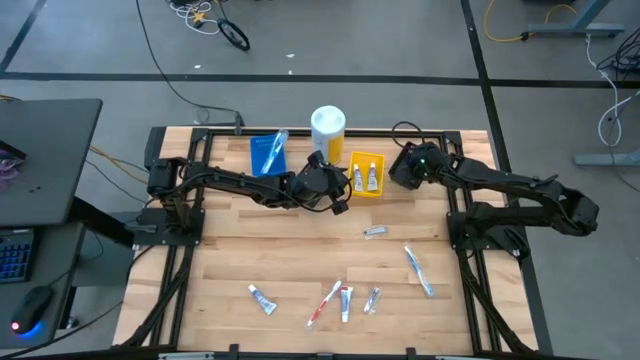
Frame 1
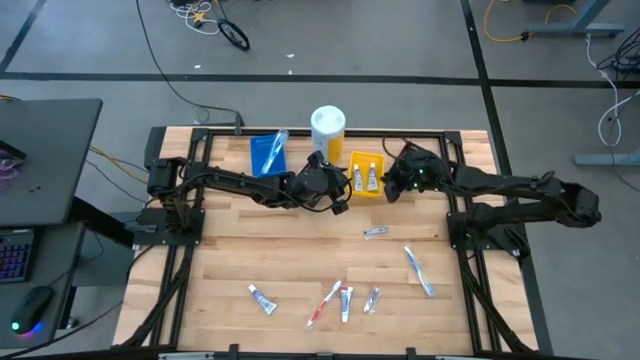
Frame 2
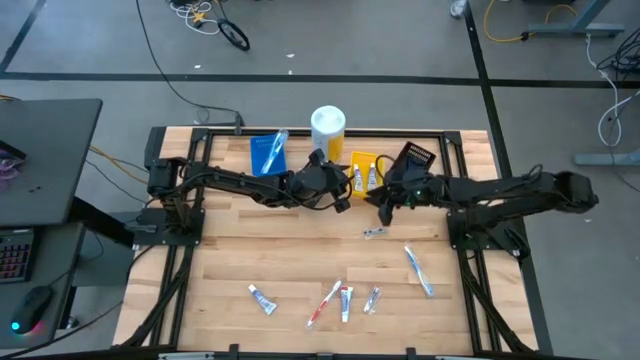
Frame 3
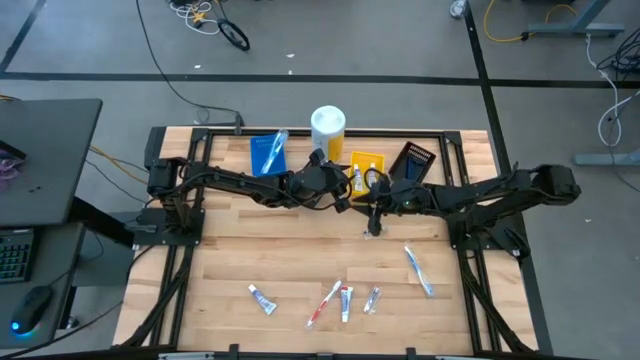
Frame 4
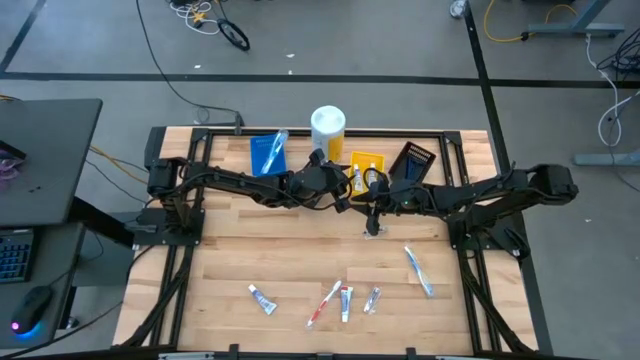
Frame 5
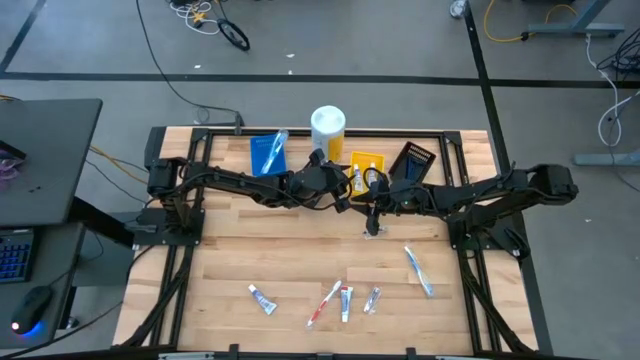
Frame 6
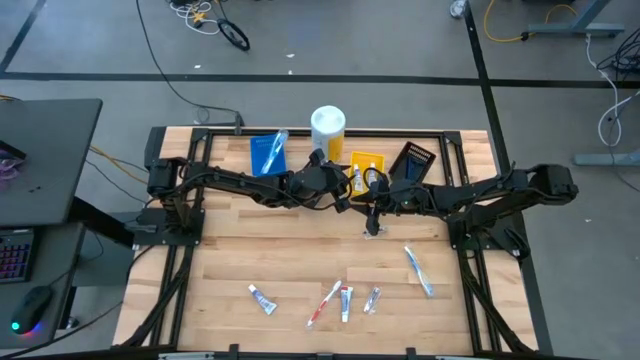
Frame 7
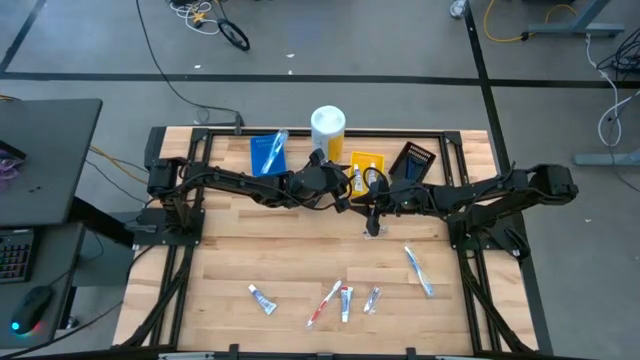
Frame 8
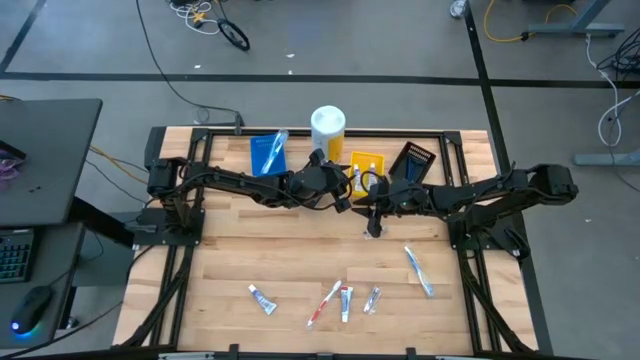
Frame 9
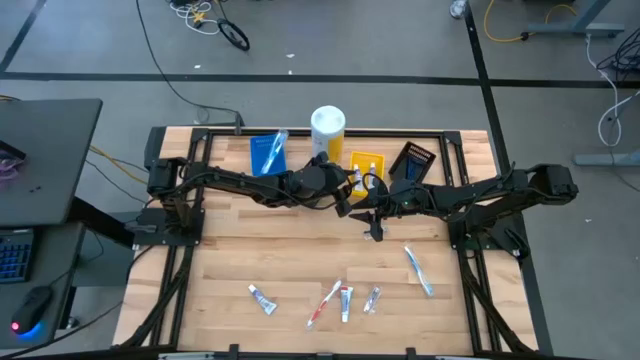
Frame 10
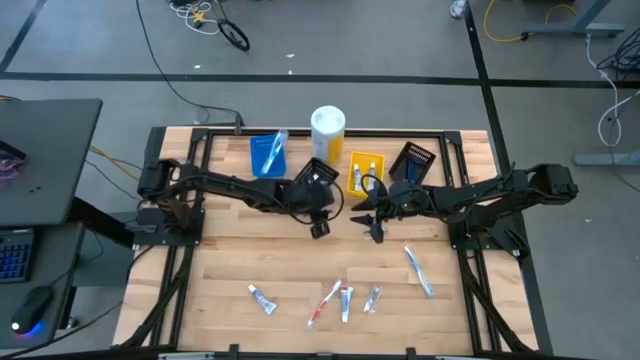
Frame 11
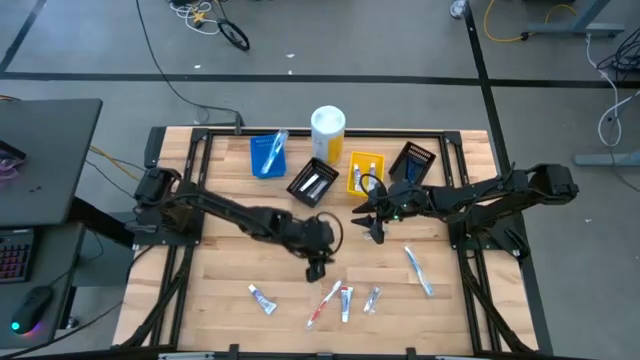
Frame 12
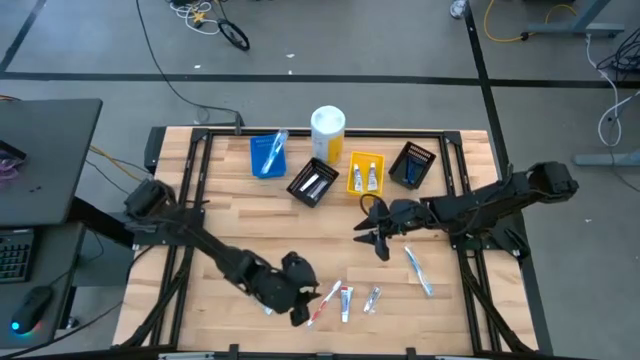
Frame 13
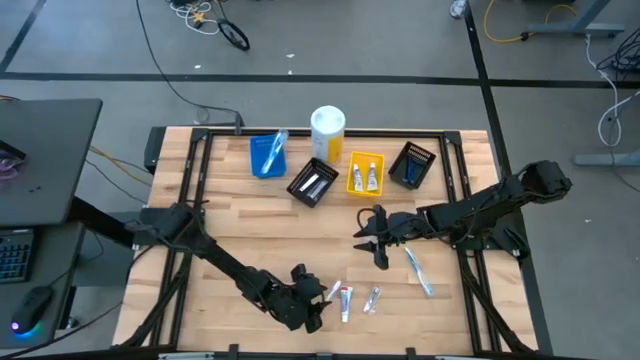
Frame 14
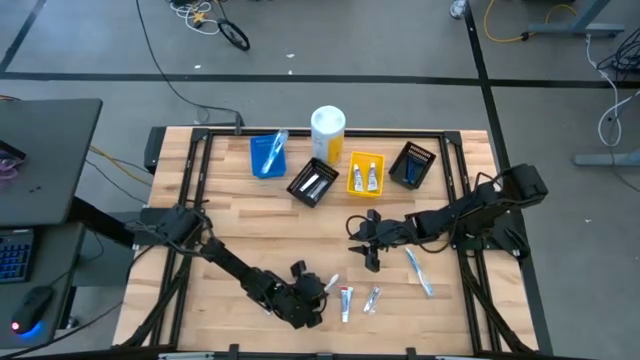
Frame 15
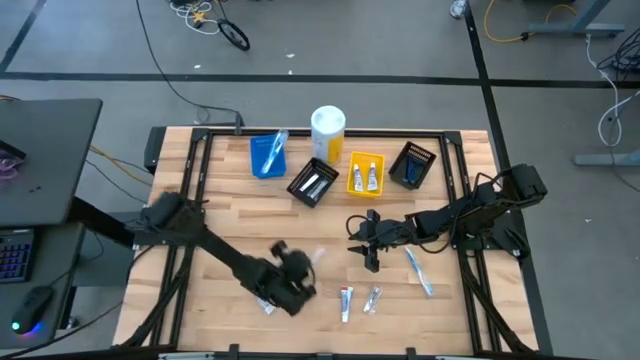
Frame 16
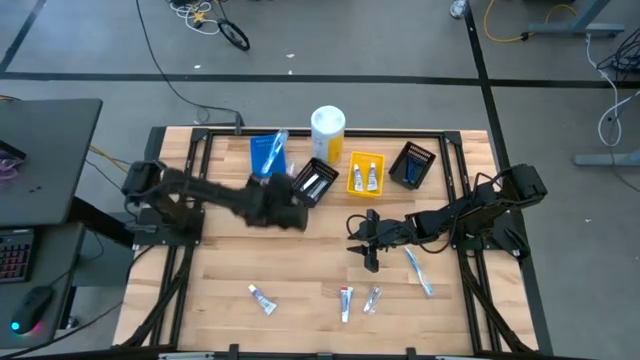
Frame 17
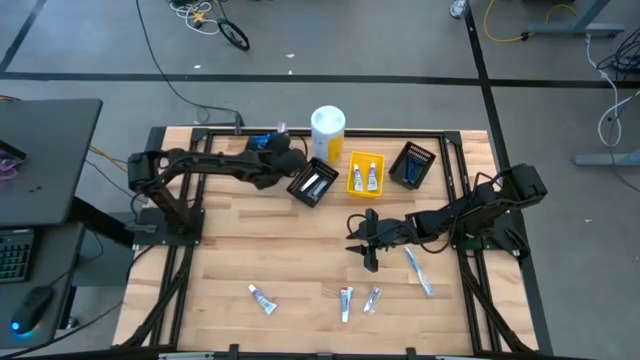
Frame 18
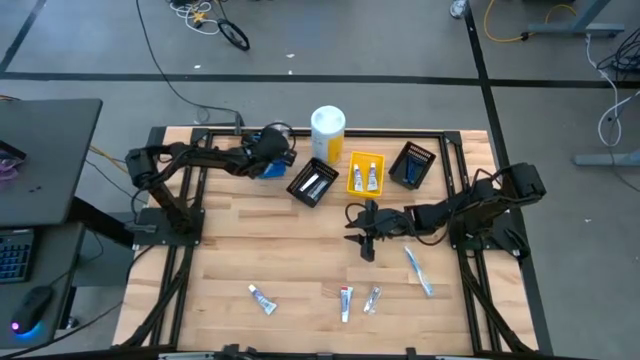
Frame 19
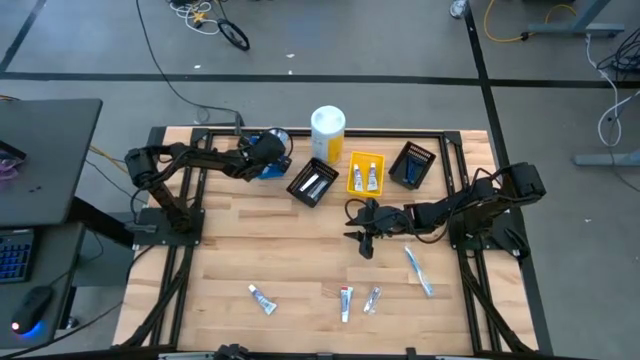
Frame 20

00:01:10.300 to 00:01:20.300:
Task: Pick & Place Travel size toiletries
Put the orange toothbrush into the blue bin

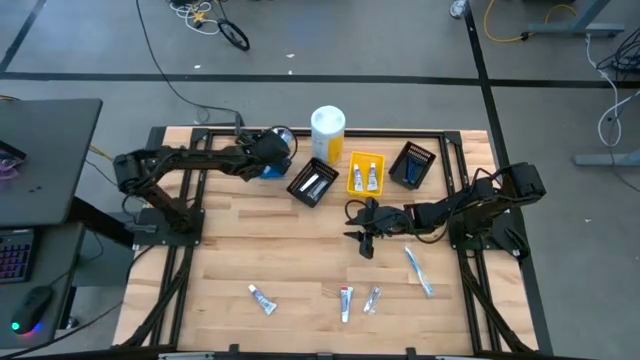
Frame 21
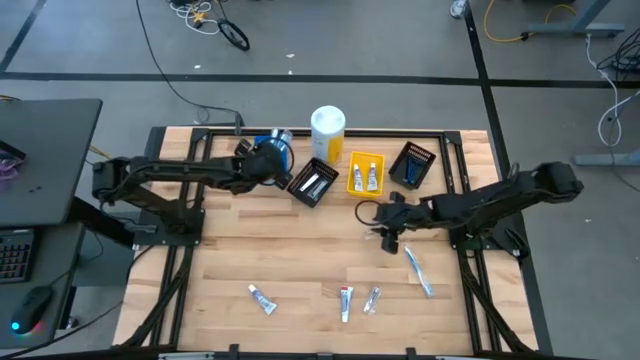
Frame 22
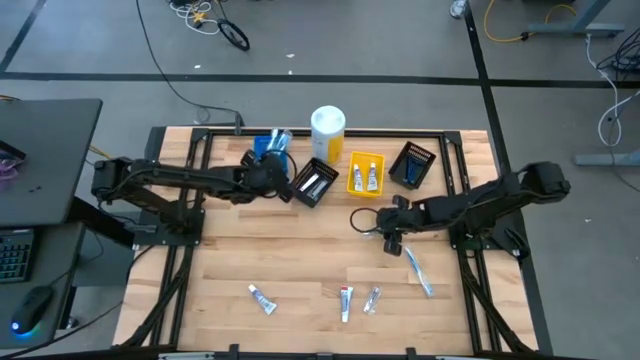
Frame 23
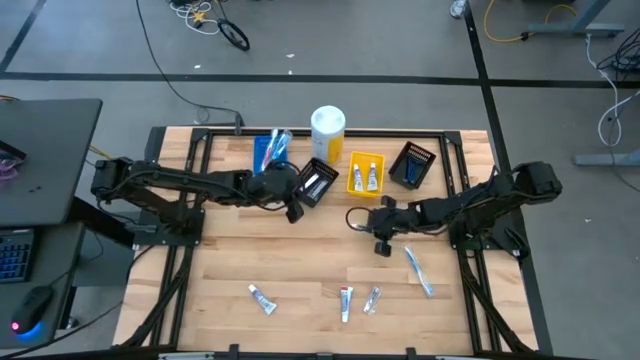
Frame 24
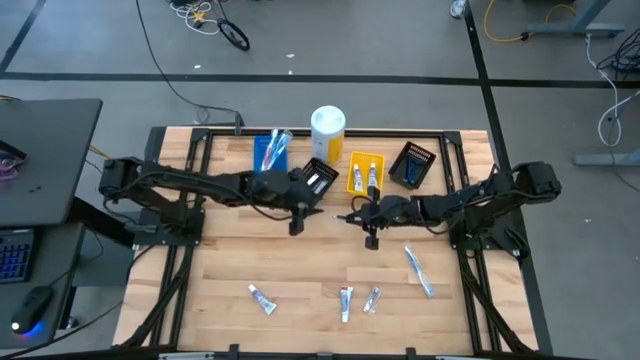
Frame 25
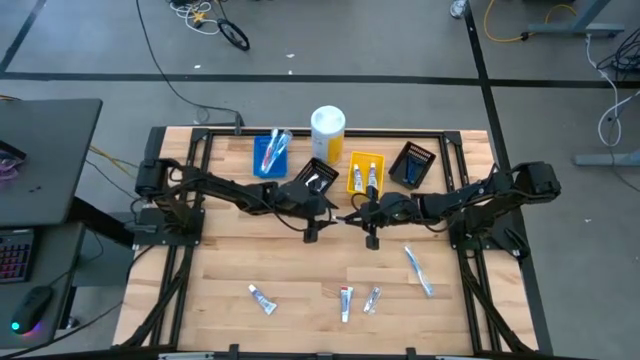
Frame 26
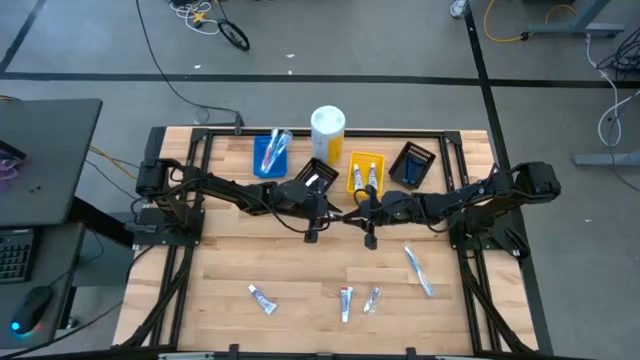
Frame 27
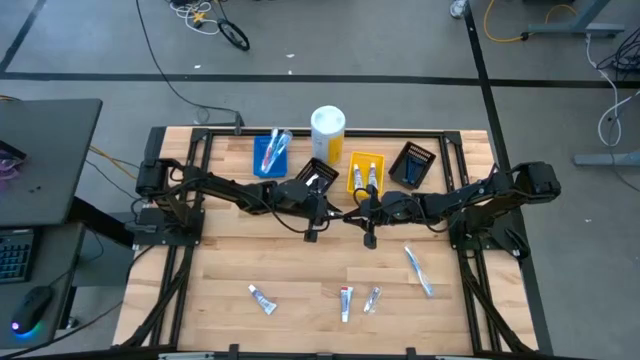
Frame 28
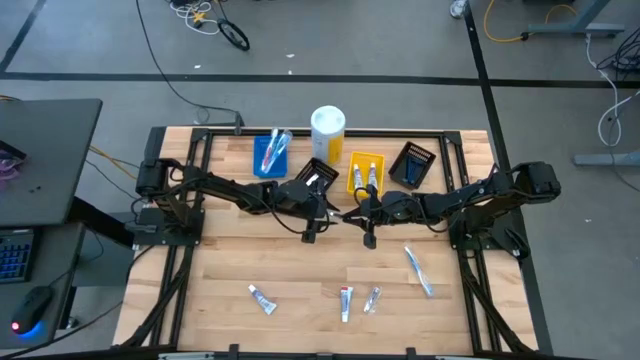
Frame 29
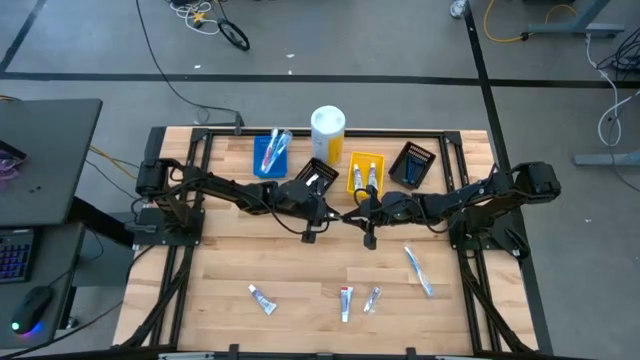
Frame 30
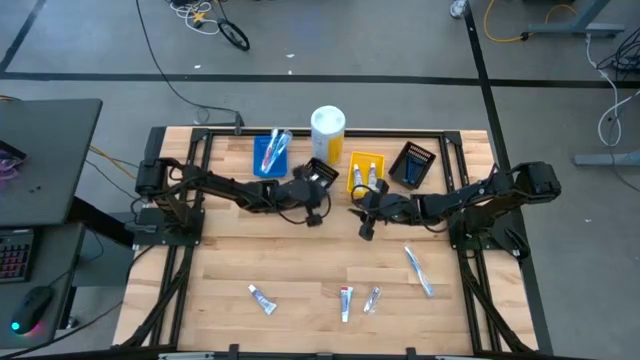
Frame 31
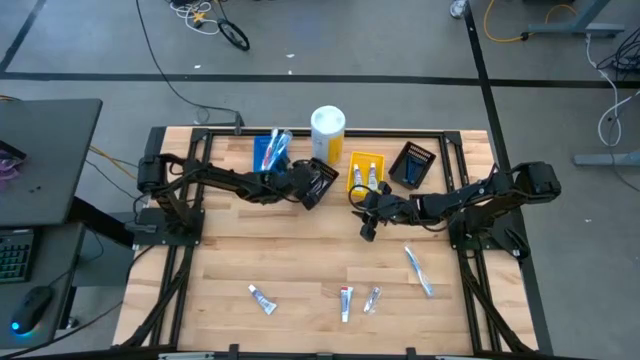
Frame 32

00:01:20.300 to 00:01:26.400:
Put the silver nail cutter into the left black bin

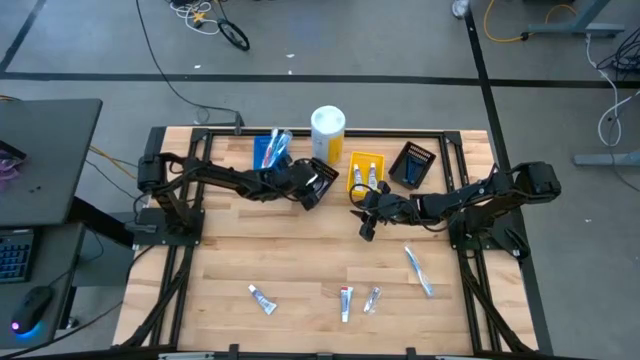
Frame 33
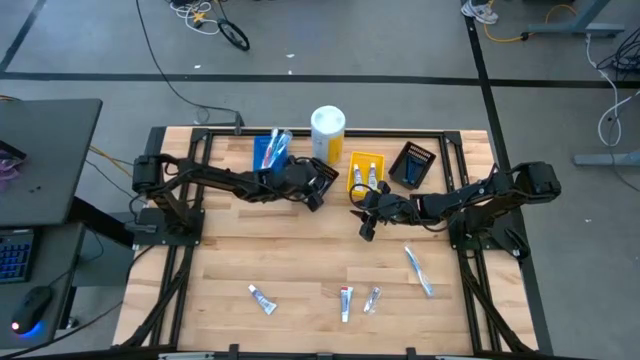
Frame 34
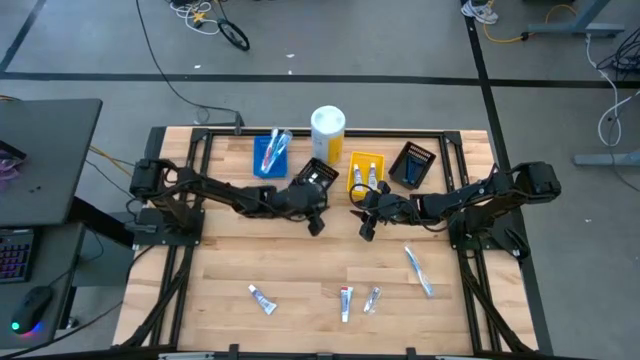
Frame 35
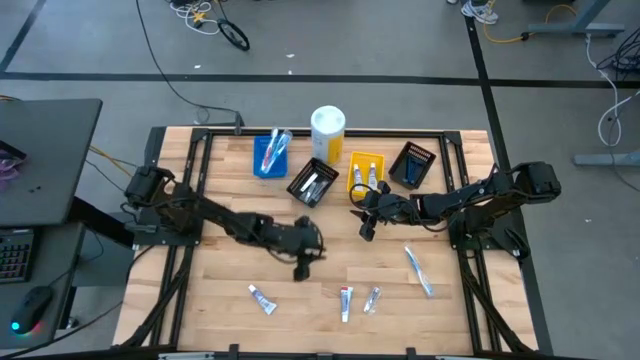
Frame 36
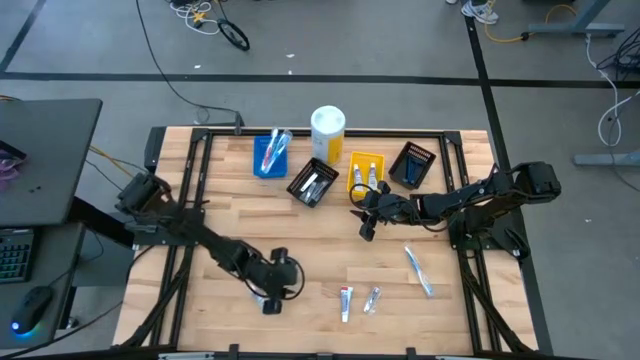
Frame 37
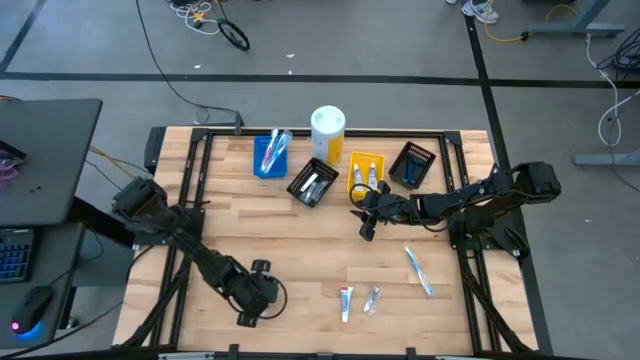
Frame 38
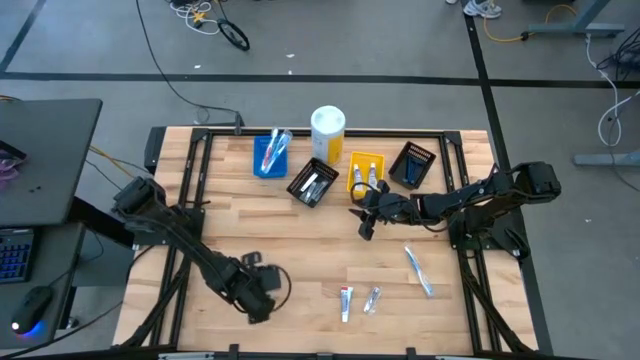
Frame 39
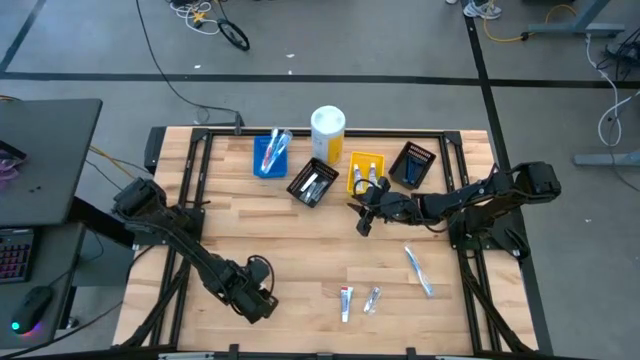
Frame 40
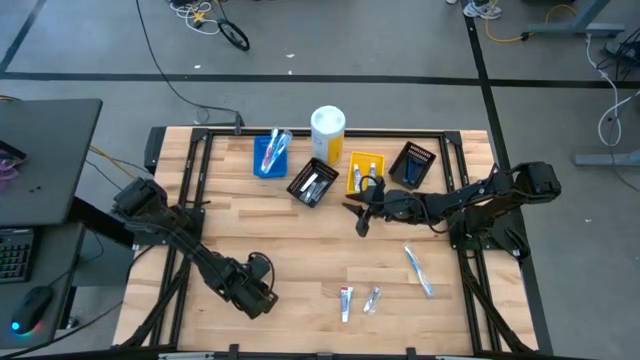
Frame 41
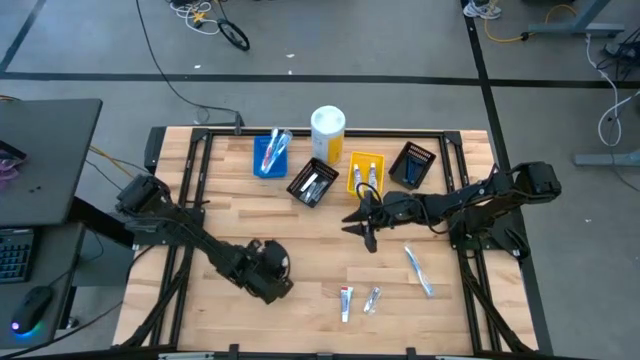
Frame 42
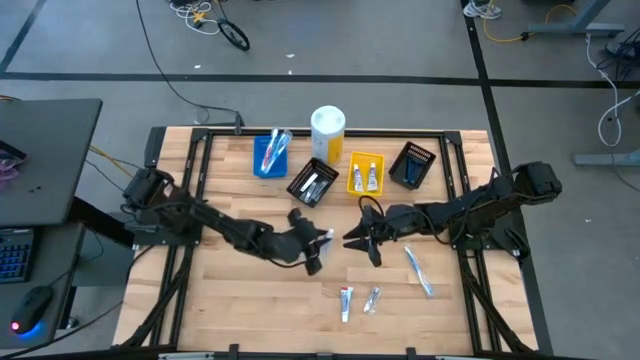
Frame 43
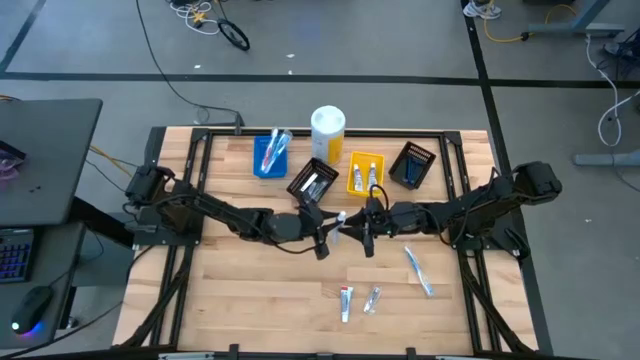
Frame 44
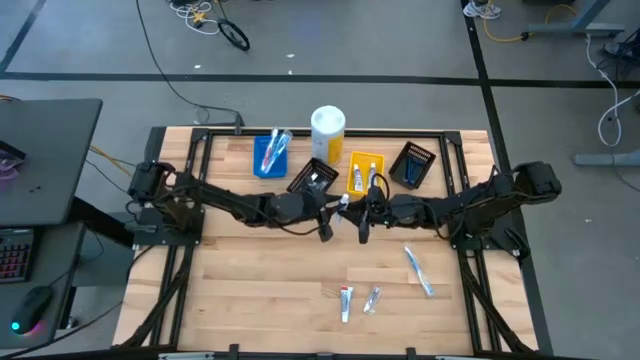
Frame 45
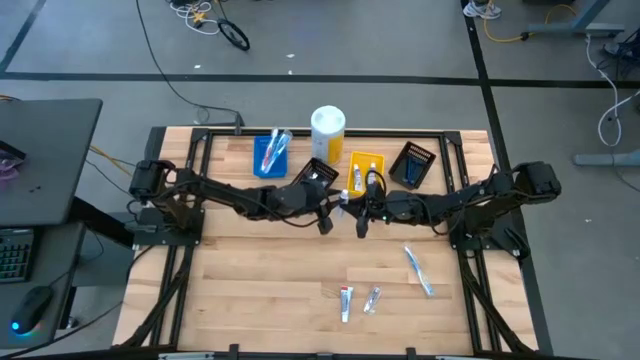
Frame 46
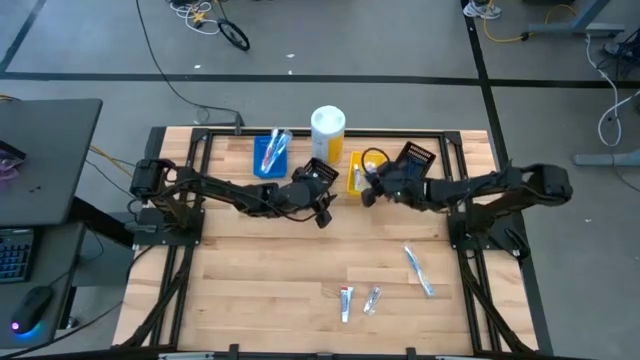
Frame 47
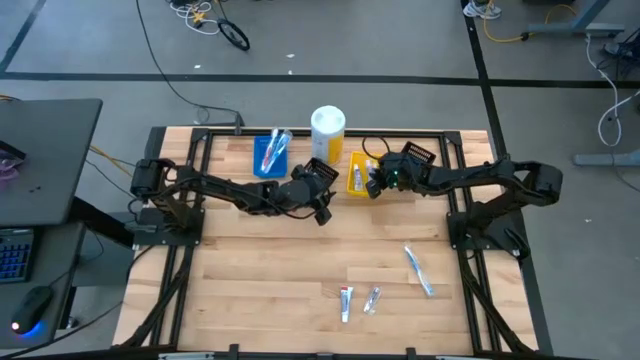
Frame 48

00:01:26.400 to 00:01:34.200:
Put the toothpaste into the yellow bin
